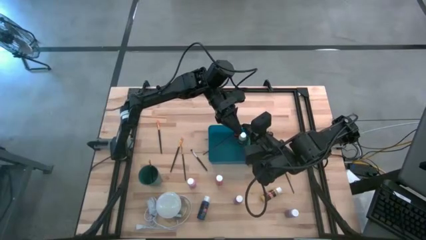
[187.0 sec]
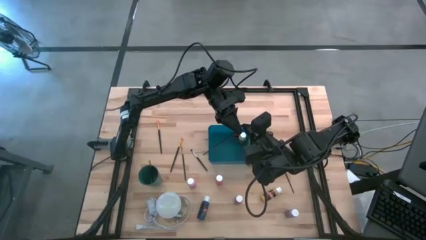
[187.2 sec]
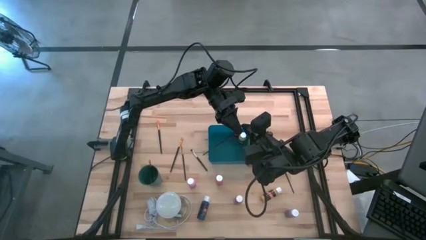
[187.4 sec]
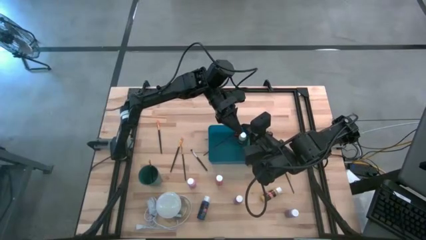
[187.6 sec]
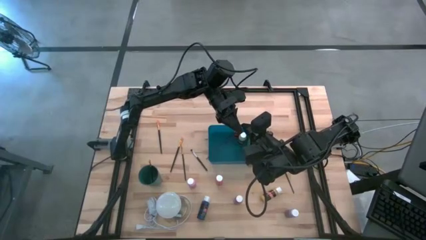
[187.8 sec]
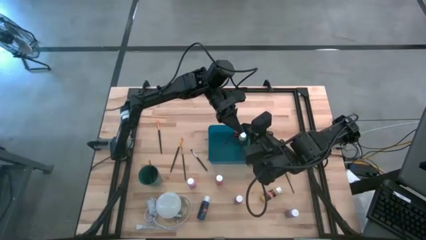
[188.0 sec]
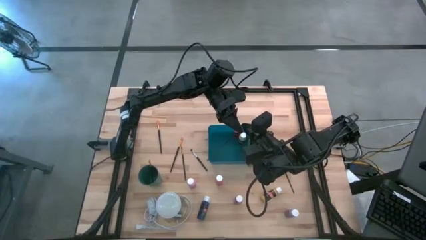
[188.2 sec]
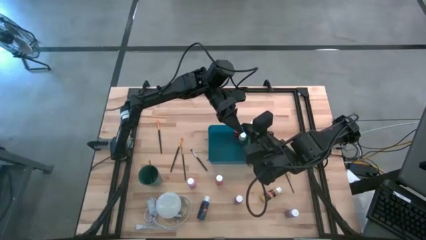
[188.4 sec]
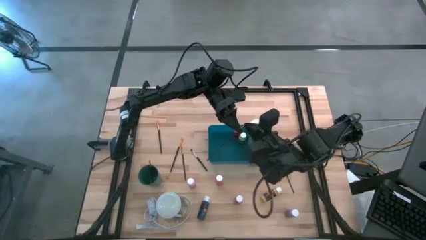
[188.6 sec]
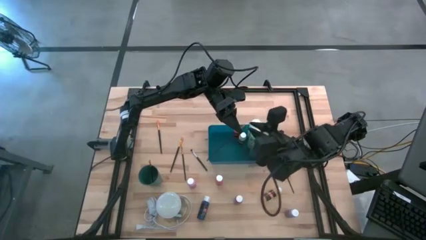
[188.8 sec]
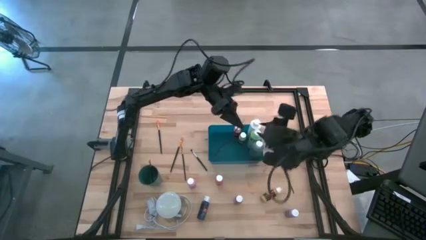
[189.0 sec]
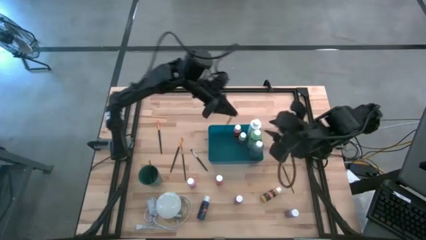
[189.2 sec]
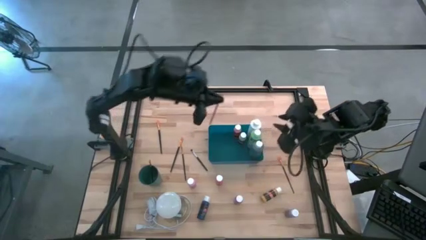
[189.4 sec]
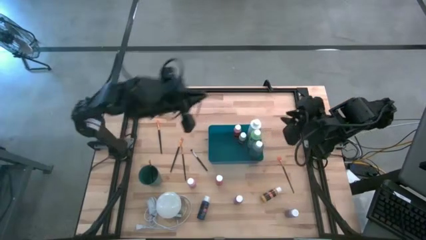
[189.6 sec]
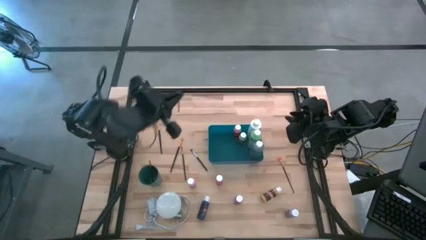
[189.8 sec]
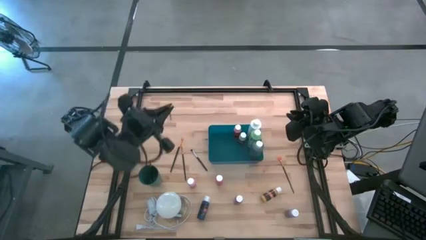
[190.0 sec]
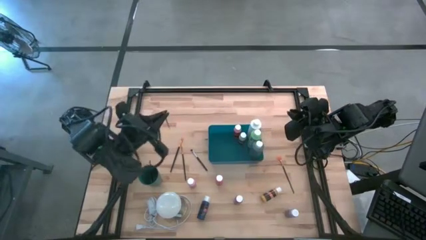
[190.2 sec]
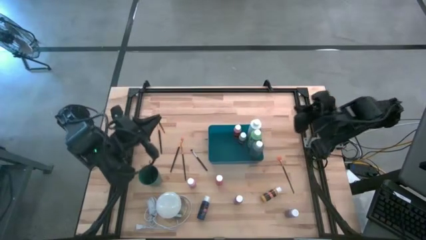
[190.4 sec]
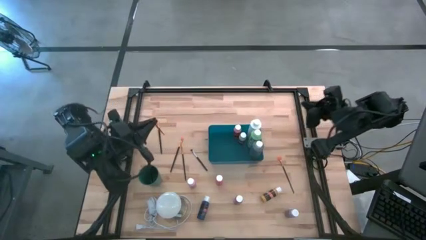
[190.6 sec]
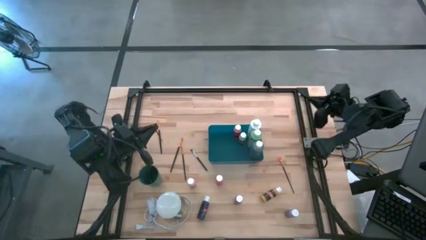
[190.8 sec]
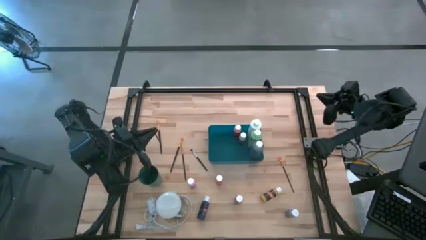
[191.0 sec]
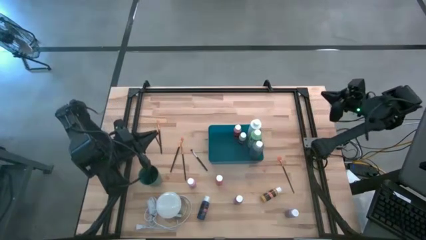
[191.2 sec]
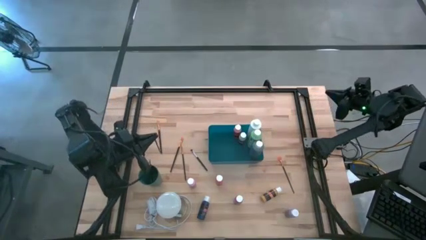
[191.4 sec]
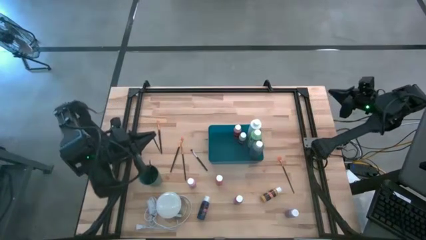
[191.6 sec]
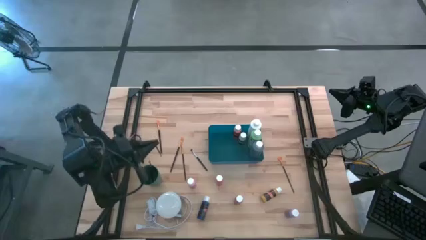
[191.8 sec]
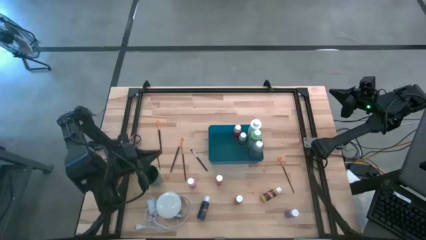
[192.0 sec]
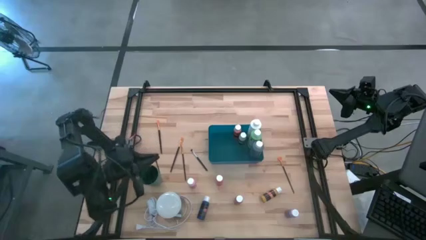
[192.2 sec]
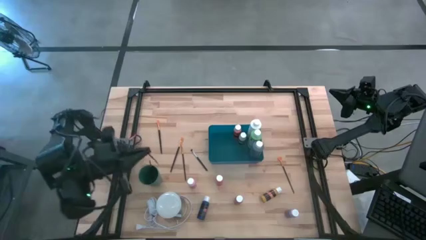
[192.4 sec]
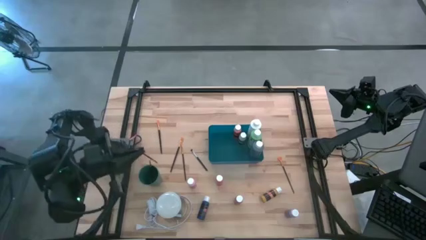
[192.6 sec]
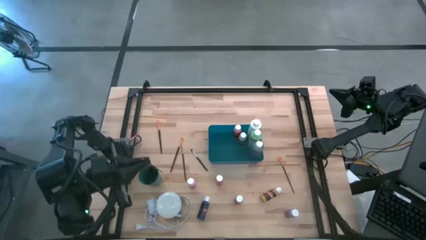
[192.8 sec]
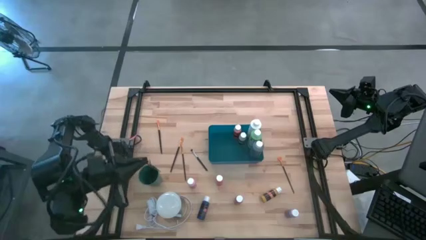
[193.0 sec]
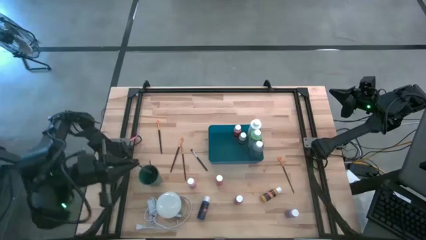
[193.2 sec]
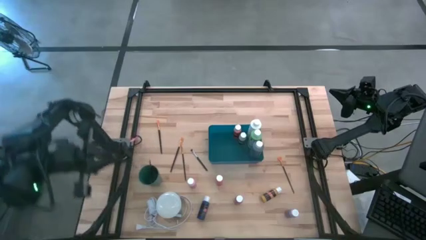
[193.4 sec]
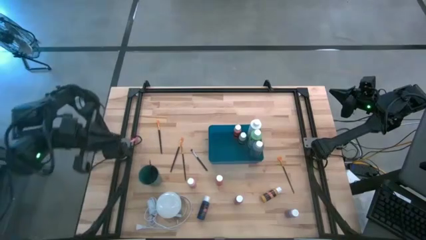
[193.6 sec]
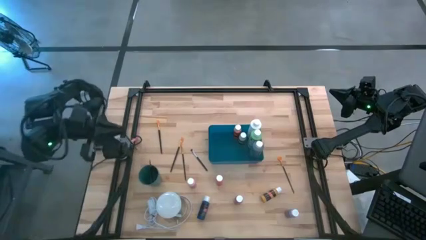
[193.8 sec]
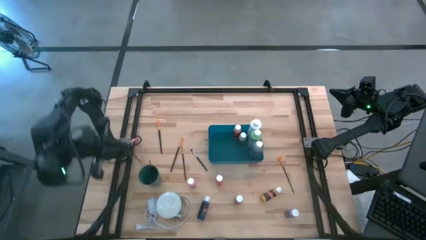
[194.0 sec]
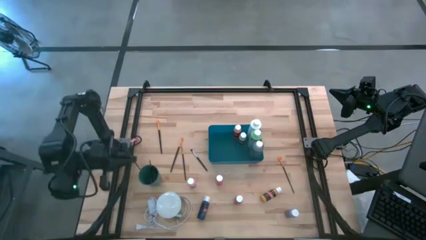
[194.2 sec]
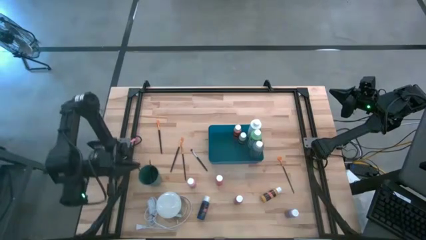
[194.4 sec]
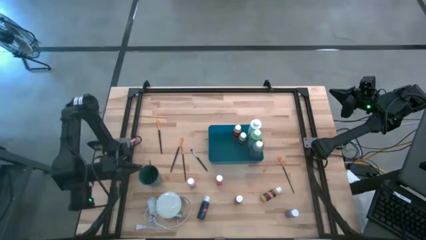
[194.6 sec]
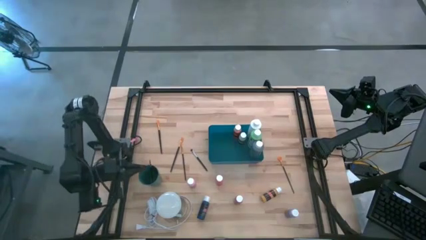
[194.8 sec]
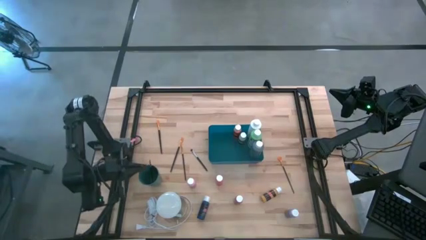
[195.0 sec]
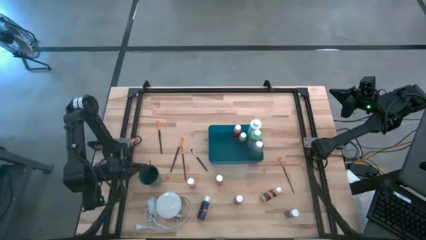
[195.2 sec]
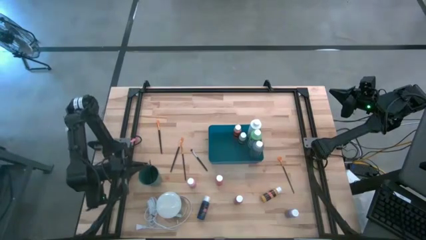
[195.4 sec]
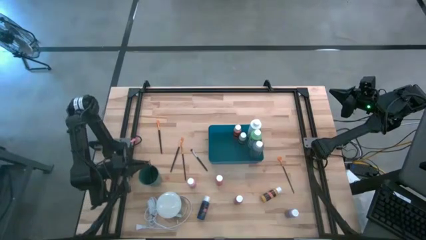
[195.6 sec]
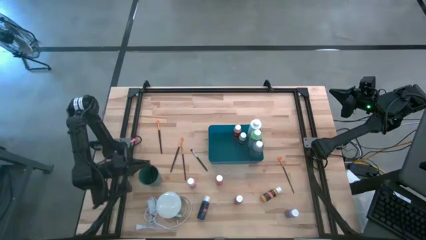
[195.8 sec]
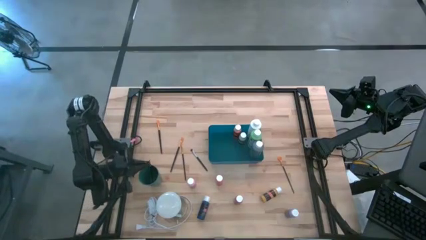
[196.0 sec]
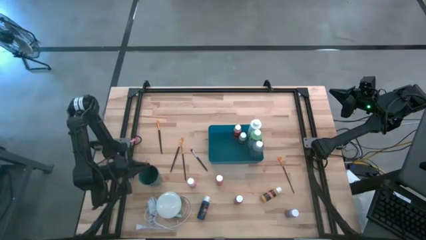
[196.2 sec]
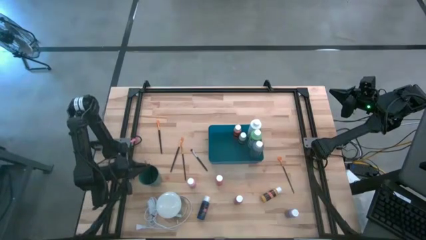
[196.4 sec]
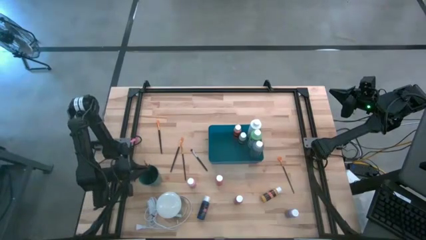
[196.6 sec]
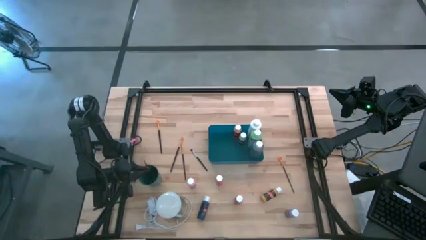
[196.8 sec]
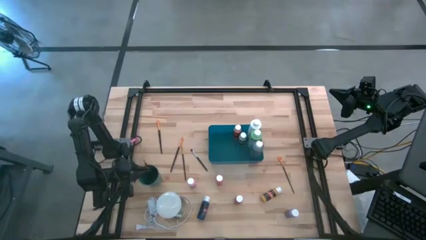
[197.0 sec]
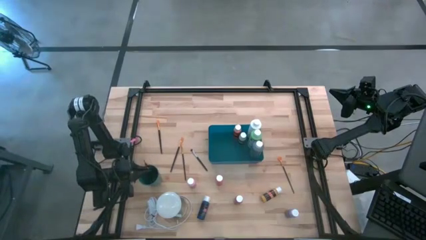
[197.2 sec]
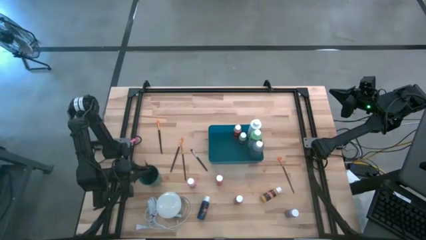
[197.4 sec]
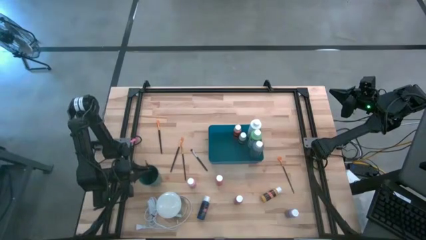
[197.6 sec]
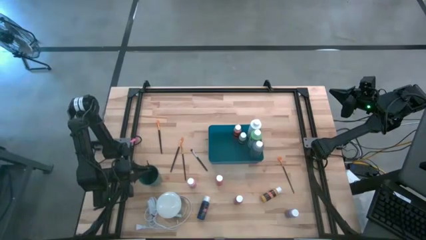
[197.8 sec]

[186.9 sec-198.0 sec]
Task: Pick & Place Paint Supplies
Put the gold paintbrush into the green cup

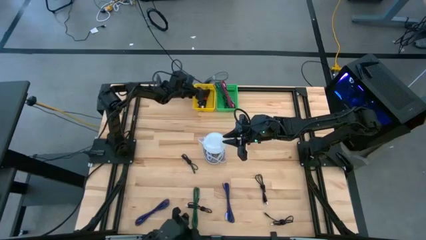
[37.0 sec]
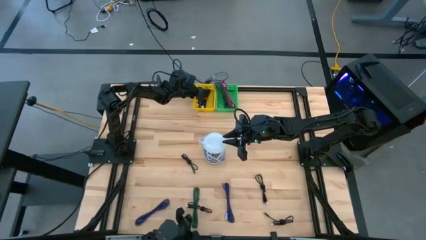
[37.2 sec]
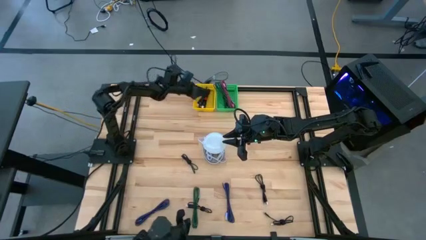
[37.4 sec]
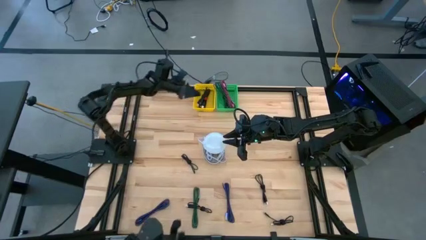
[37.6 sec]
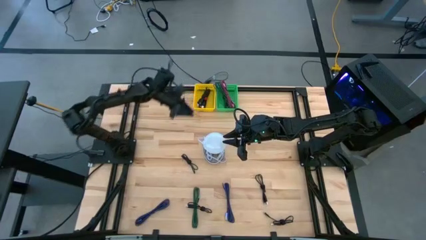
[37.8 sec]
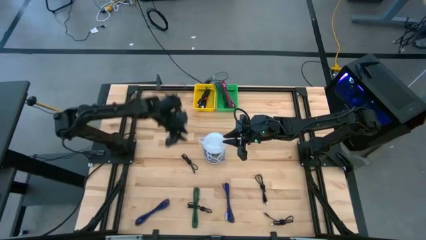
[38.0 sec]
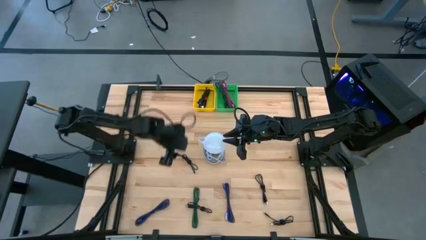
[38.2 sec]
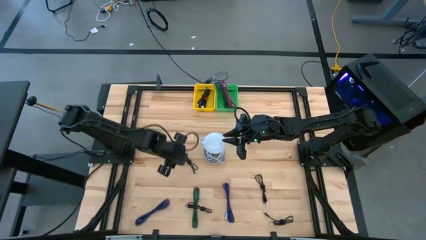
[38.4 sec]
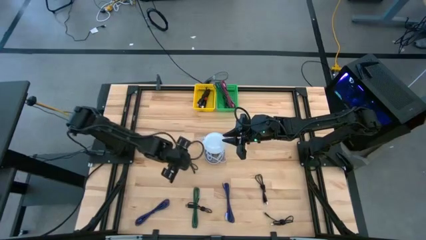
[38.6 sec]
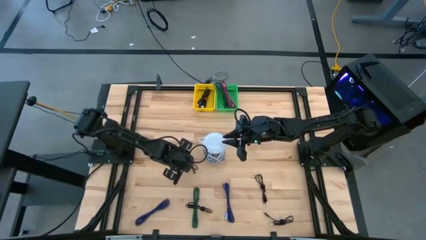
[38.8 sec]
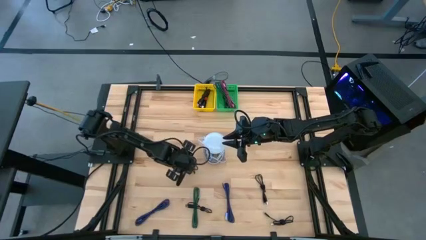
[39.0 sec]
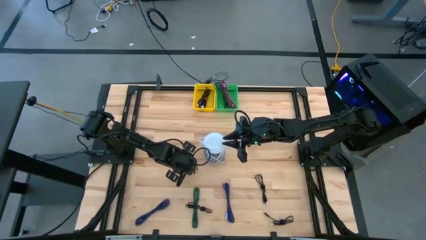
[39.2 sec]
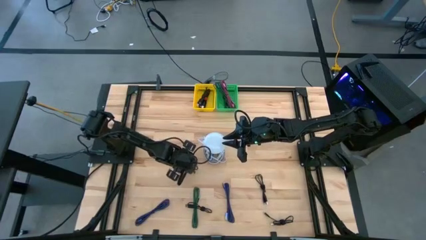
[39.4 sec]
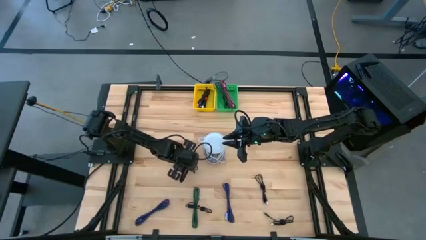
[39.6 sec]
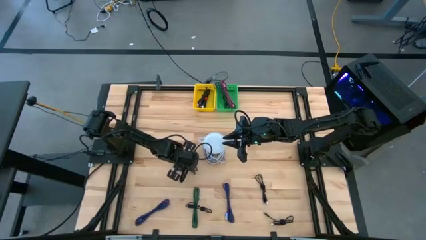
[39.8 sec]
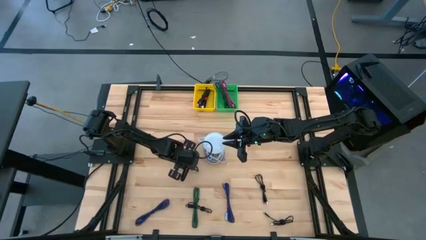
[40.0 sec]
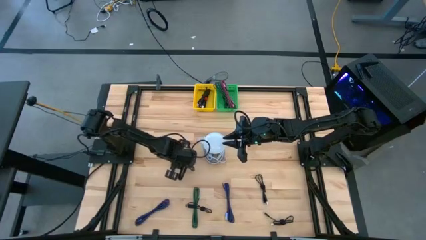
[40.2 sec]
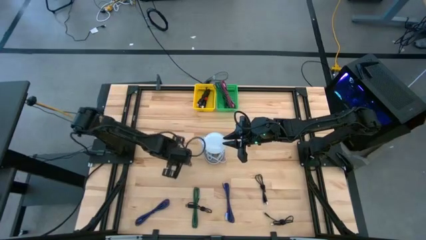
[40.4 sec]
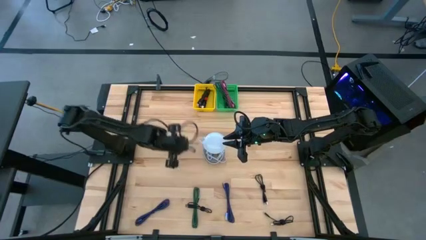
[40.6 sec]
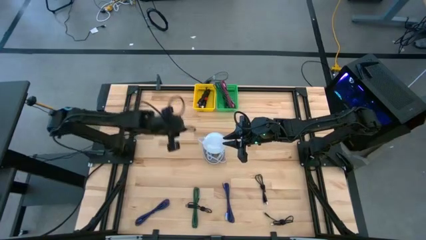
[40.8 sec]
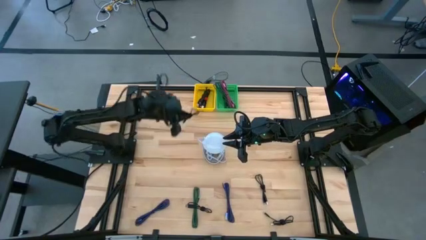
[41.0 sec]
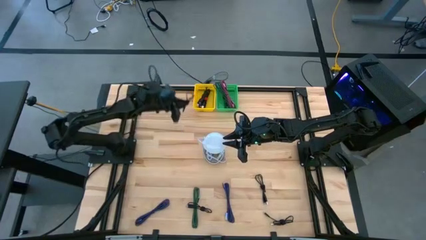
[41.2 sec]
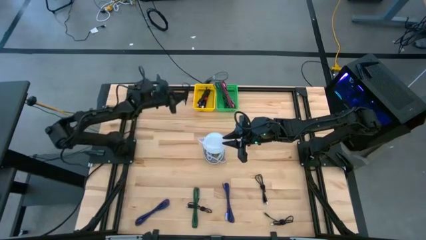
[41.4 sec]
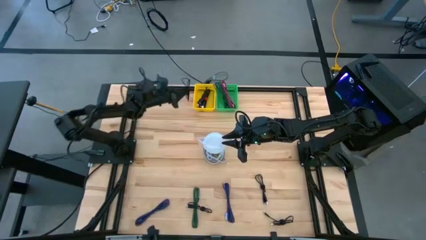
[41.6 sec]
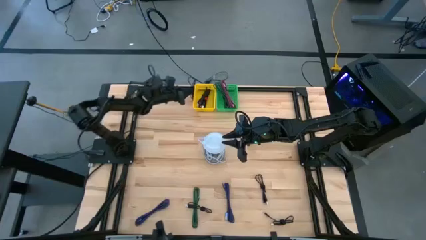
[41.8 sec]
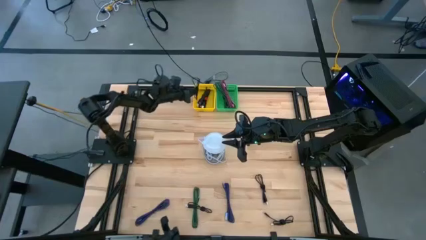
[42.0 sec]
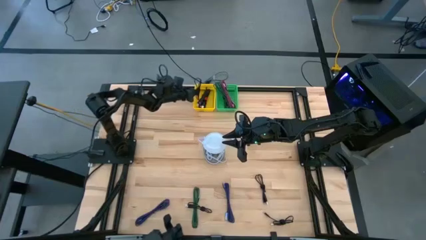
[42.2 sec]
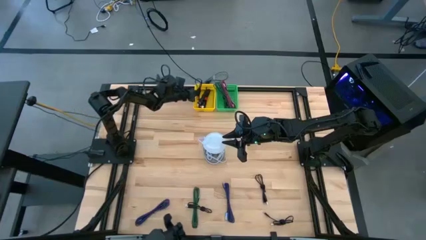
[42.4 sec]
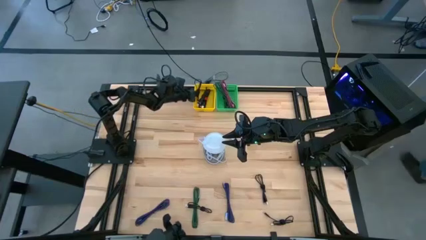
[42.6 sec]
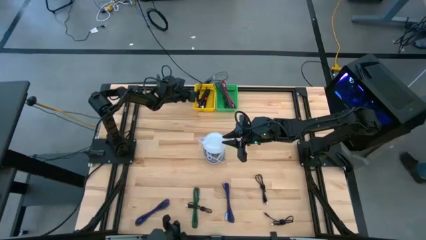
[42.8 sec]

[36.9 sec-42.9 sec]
Task: Pick & Place USB Port
Put the black charger cable into the yellow bin
